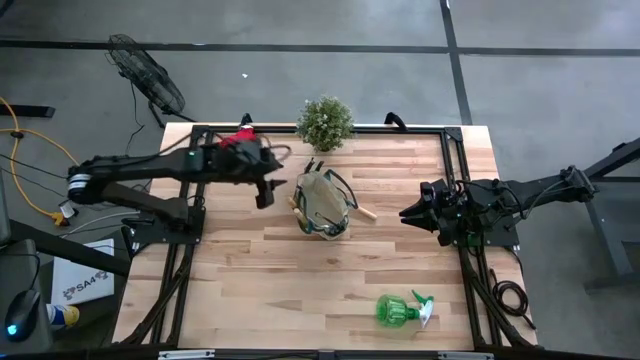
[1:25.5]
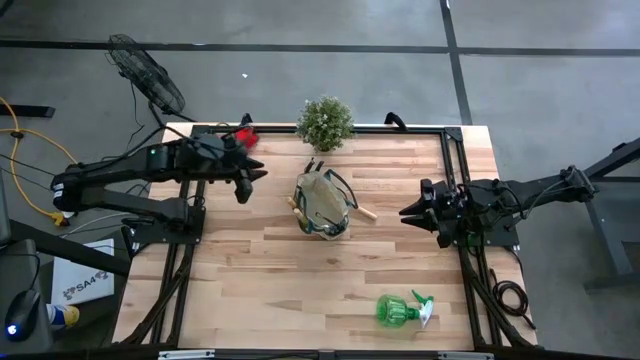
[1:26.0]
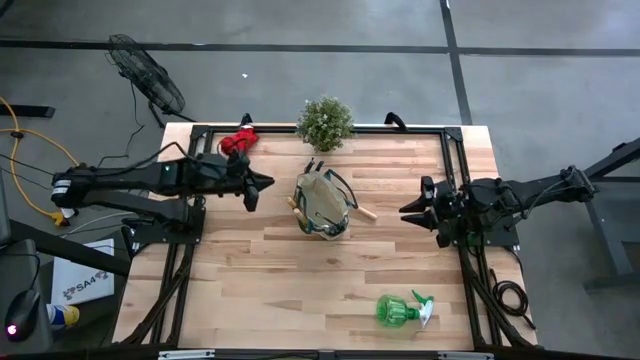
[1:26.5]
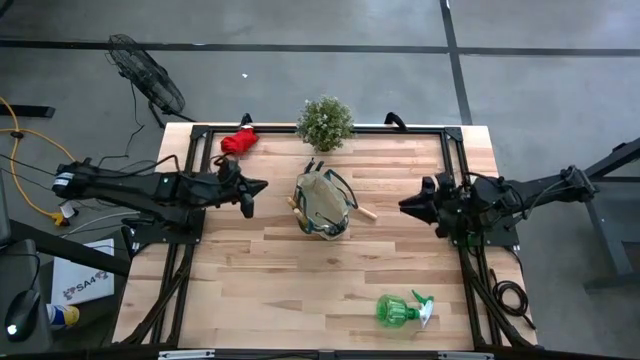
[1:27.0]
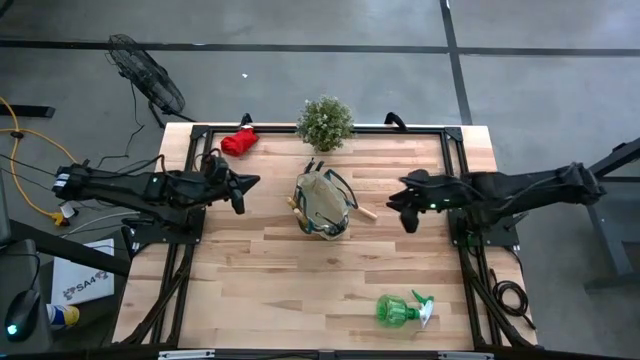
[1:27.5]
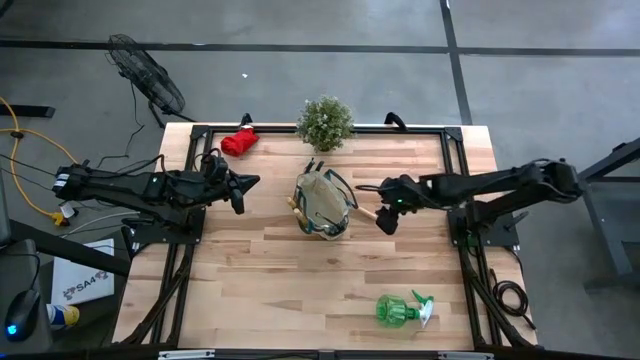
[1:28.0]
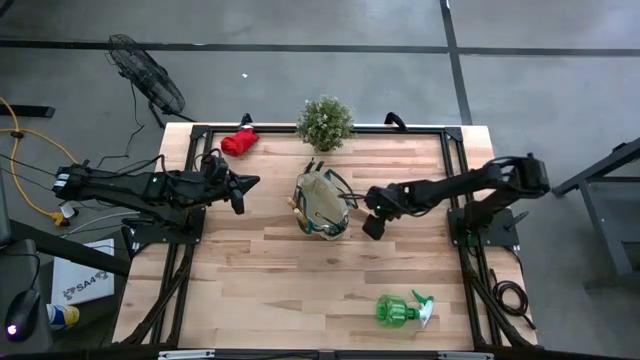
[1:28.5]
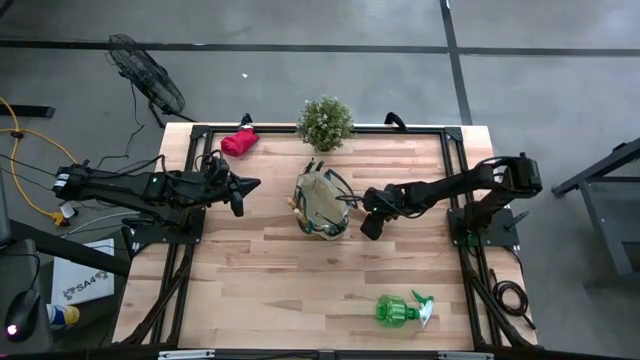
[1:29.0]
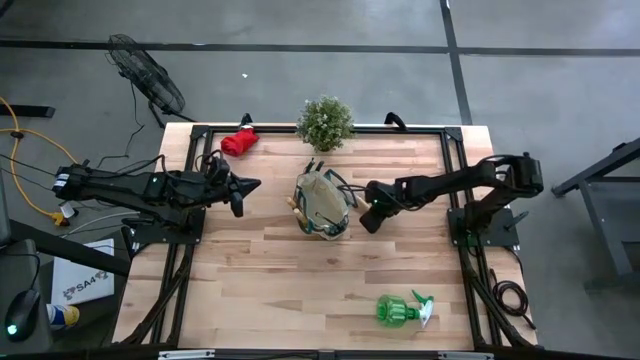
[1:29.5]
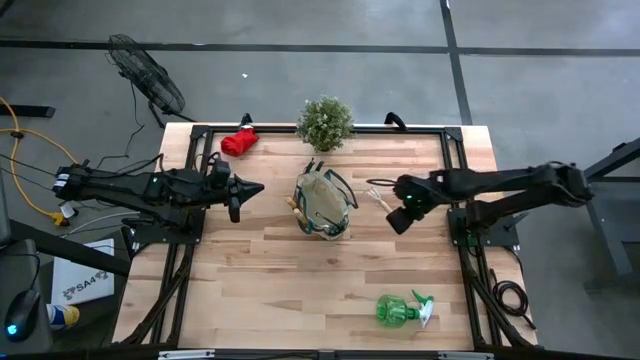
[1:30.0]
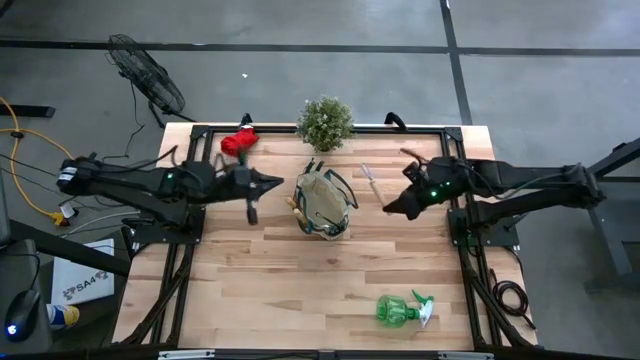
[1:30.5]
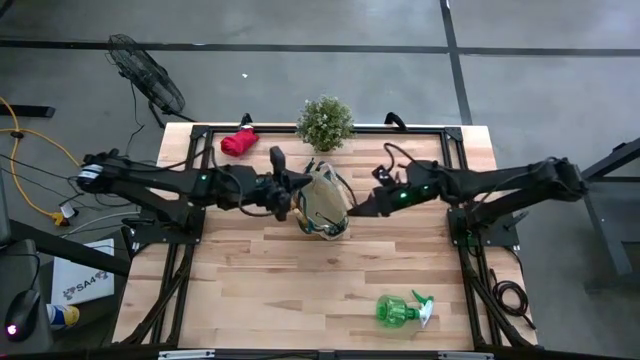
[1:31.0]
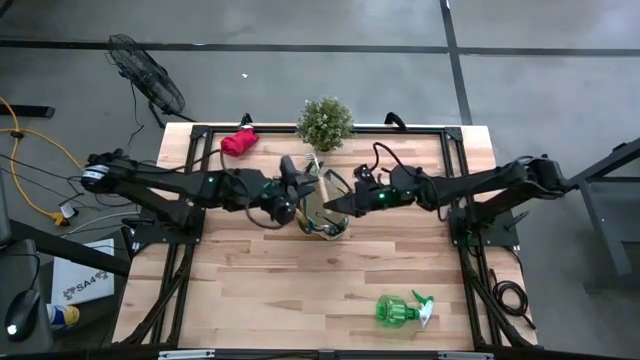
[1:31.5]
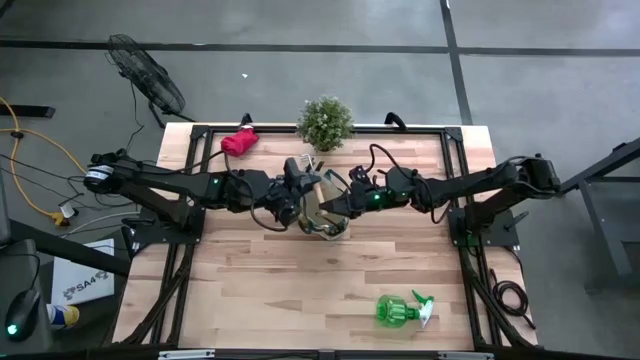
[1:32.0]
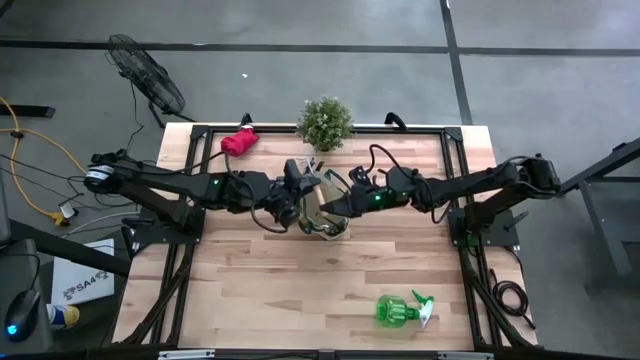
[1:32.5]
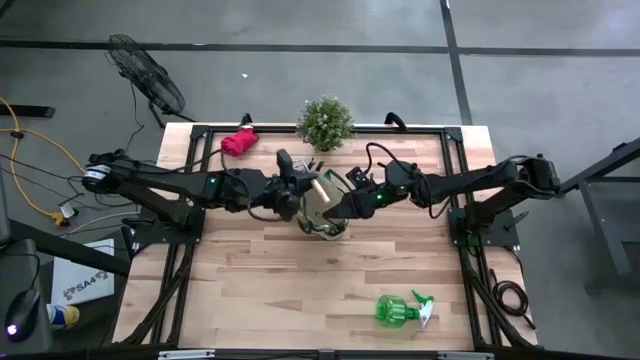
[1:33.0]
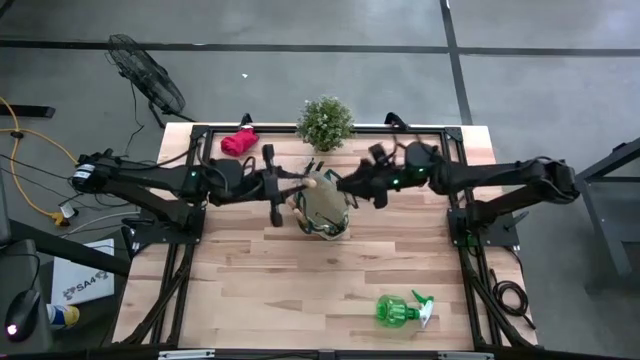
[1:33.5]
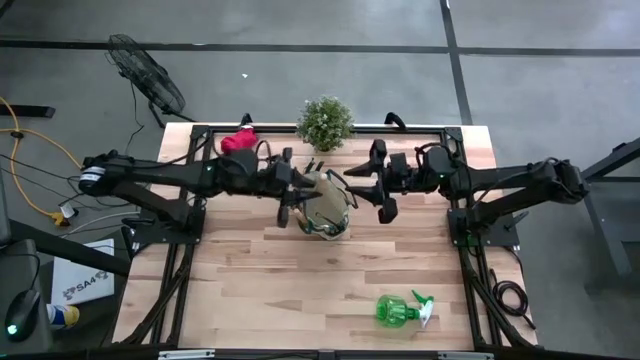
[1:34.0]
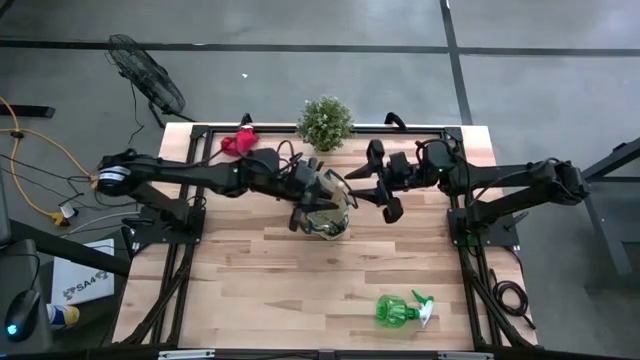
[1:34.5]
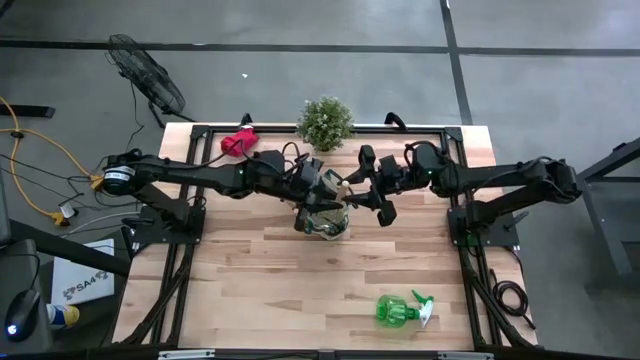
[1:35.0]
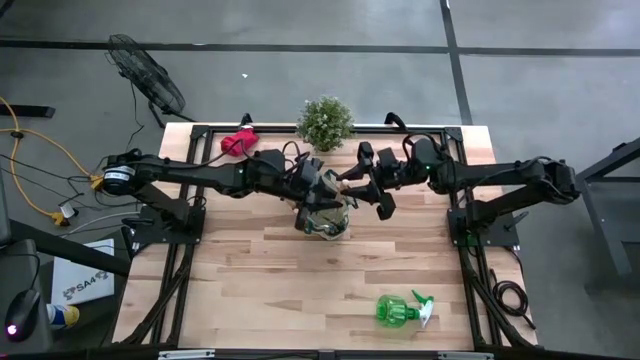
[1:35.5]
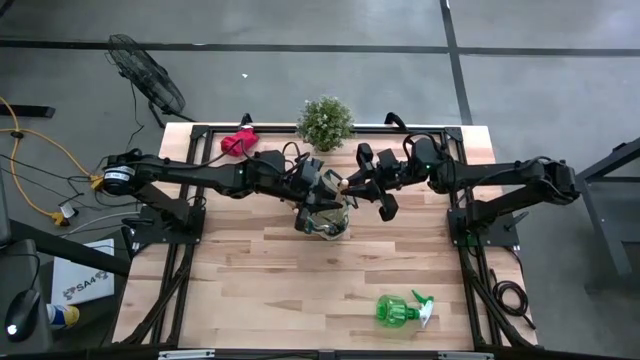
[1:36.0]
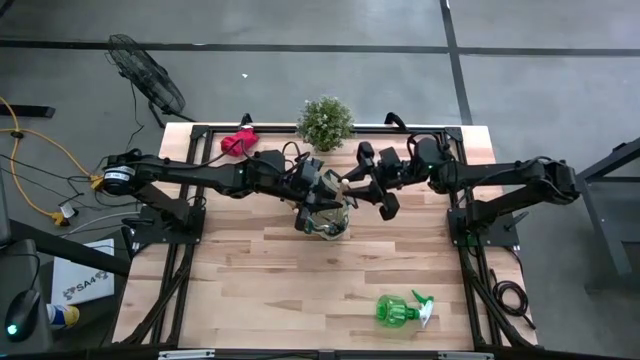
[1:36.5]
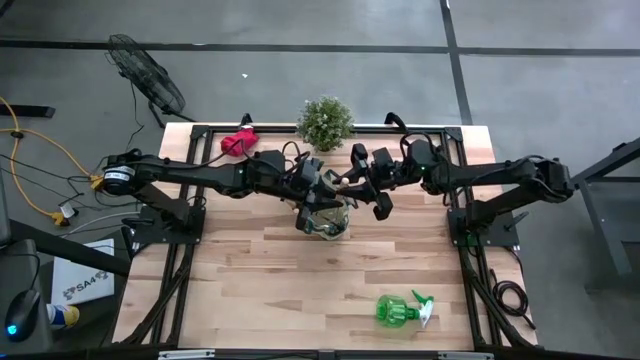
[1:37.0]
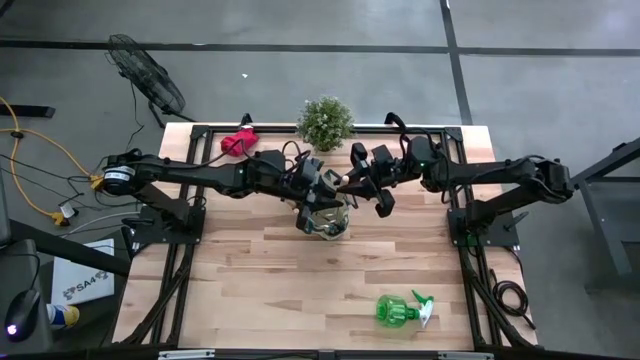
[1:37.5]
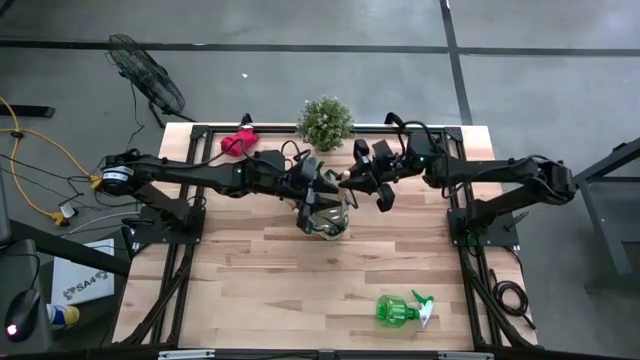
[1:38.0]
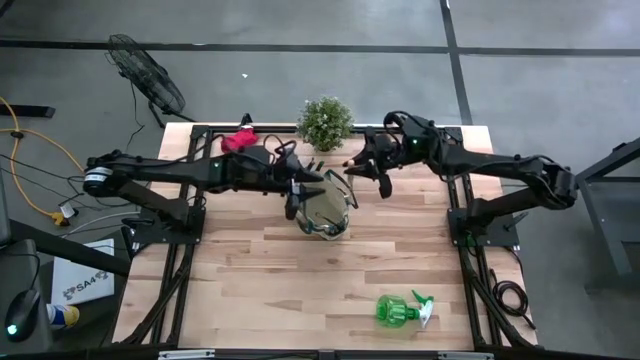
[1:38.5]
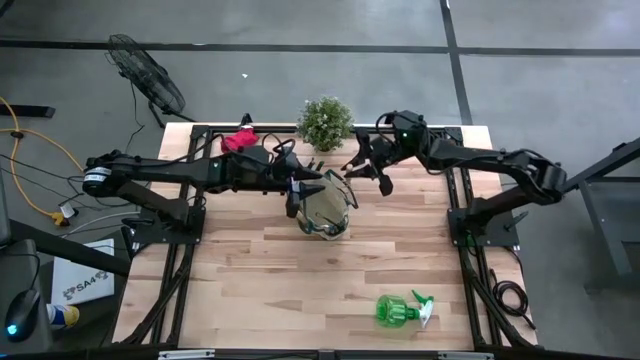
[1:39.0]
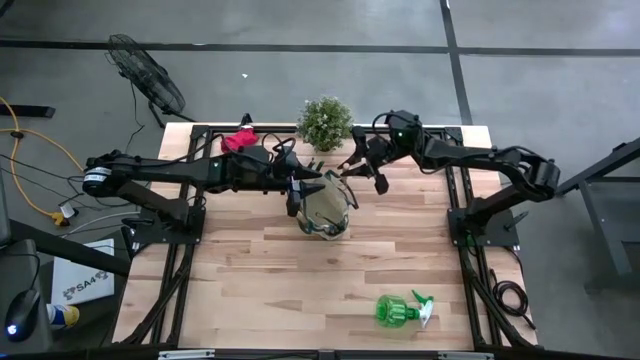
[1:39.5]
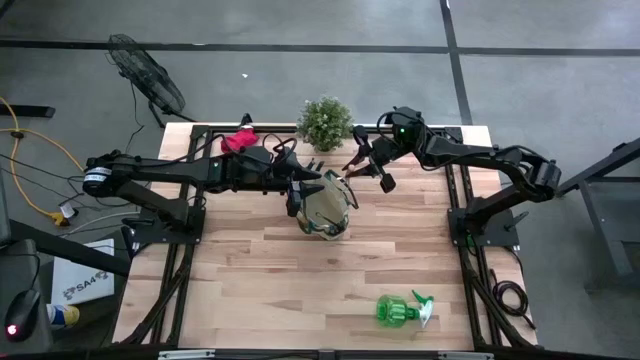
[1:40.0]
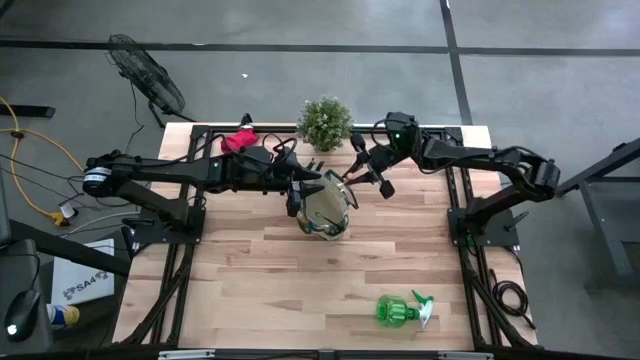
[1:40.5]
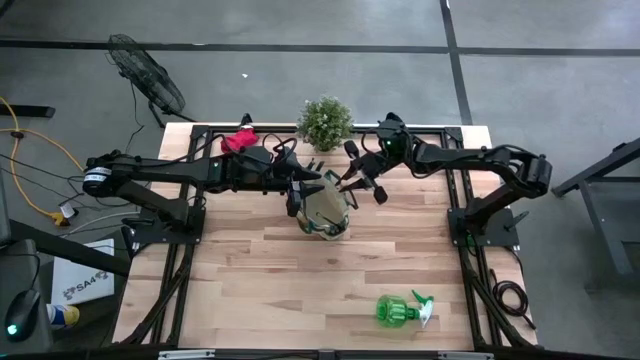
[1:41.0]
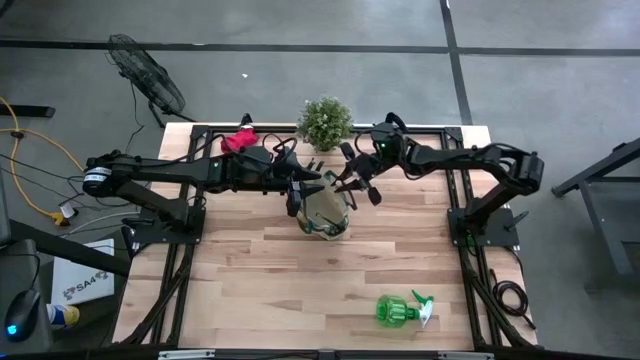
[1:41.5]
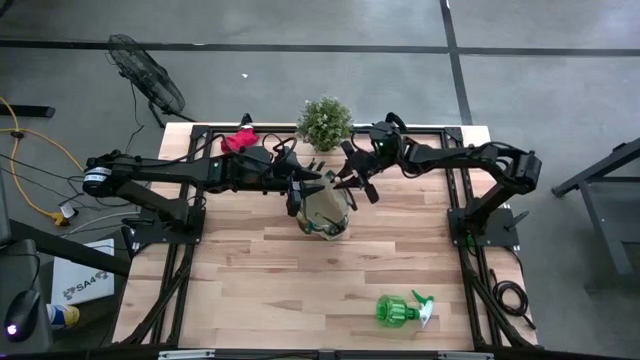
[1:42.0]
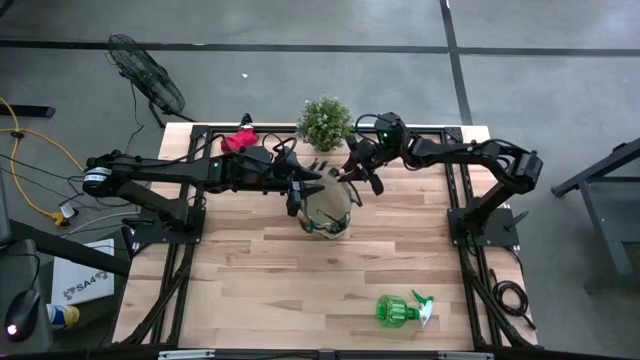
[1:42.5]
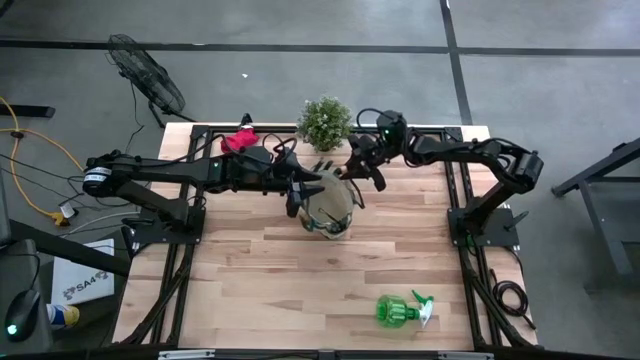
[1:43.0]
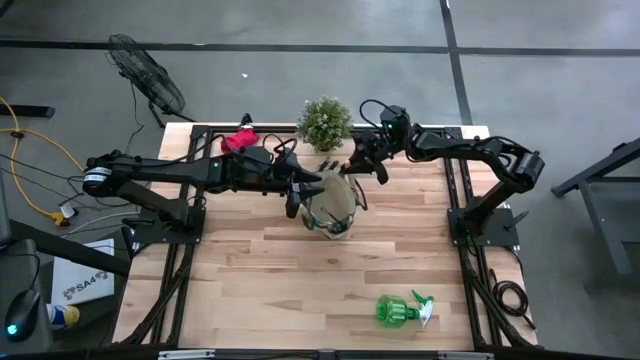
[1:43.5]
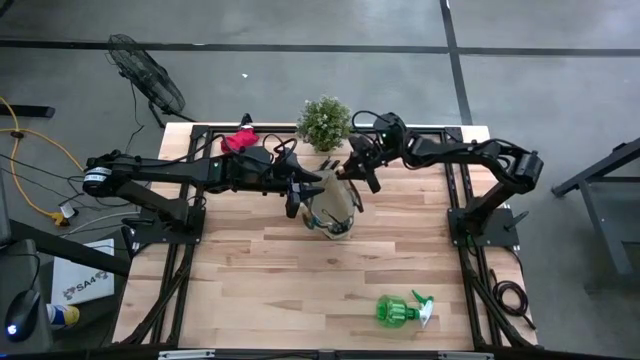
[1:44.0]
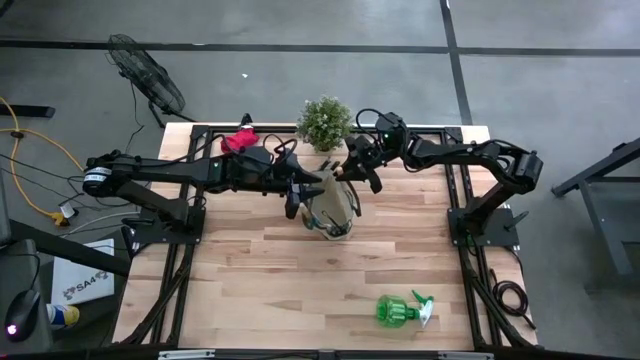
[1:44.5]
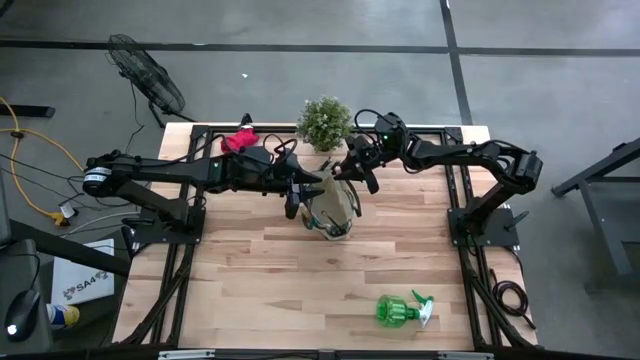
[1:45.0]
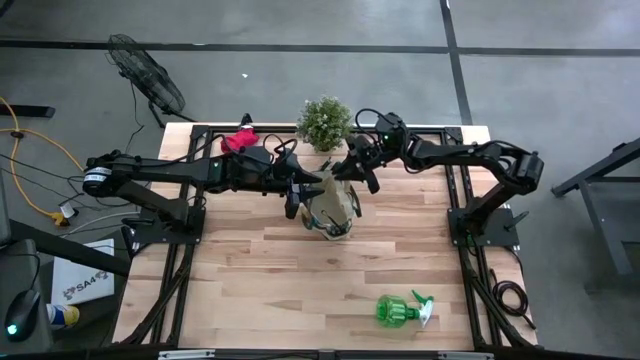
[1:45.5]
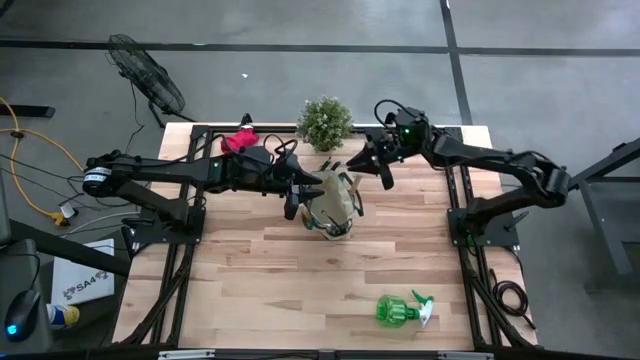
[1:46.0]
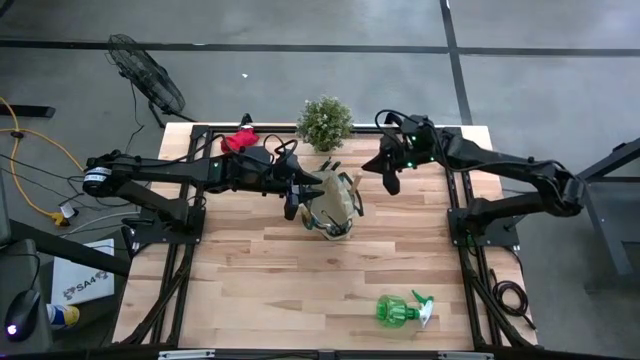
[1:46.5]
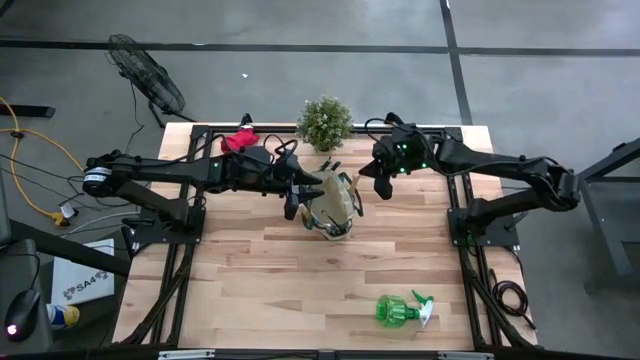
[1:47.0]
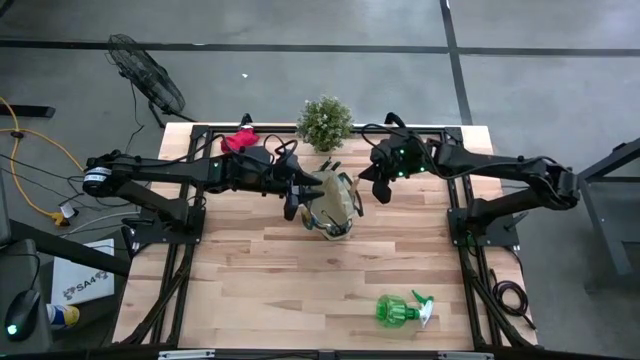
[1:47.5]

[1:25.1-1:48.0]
Task: Pick & Place Garden tools in Gardening bag
Put the brown hand rake into the brown gardening bag
